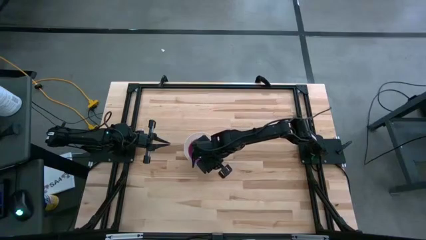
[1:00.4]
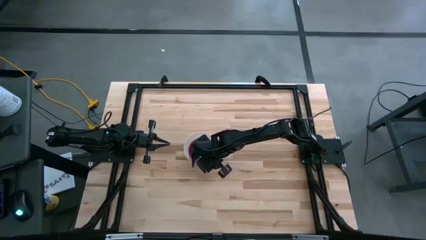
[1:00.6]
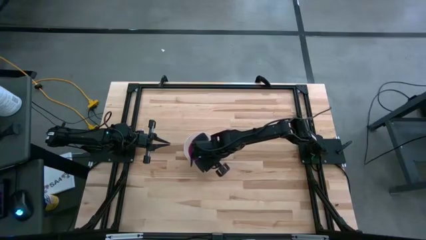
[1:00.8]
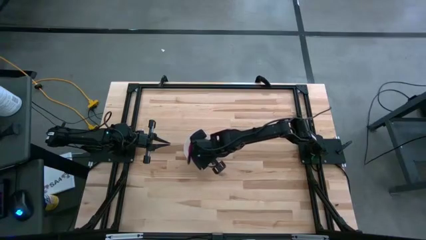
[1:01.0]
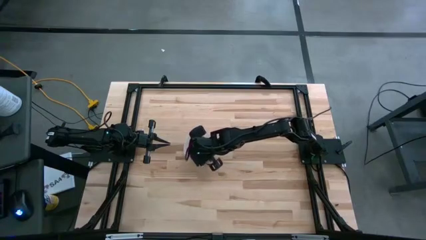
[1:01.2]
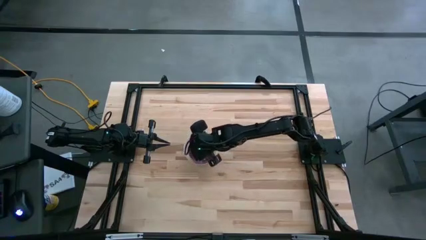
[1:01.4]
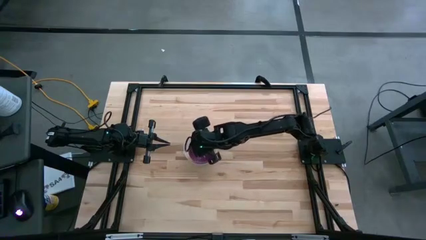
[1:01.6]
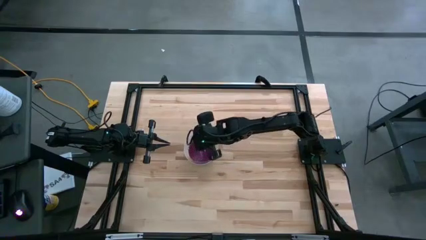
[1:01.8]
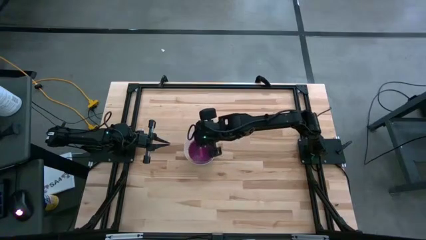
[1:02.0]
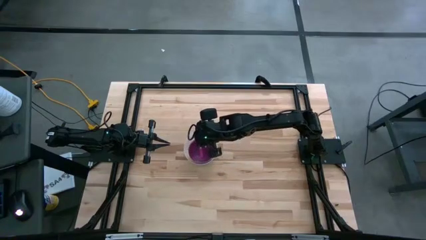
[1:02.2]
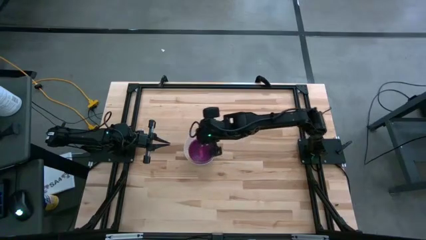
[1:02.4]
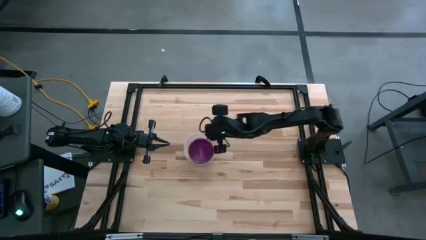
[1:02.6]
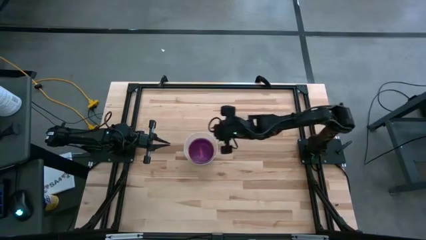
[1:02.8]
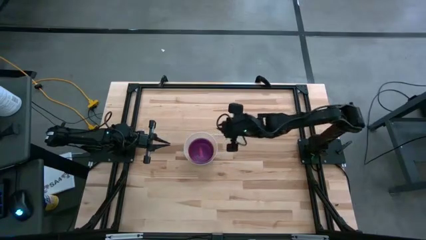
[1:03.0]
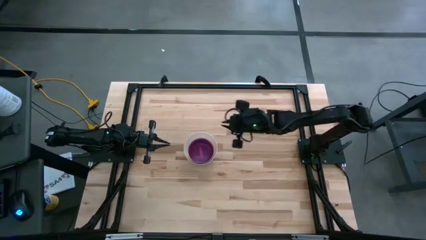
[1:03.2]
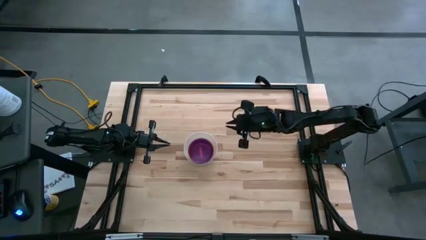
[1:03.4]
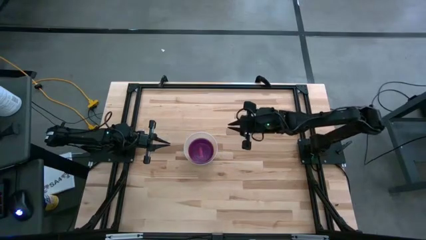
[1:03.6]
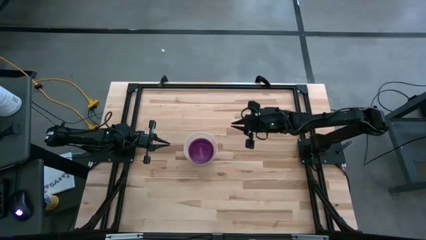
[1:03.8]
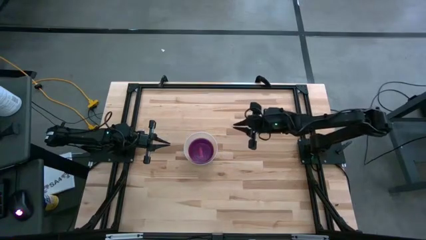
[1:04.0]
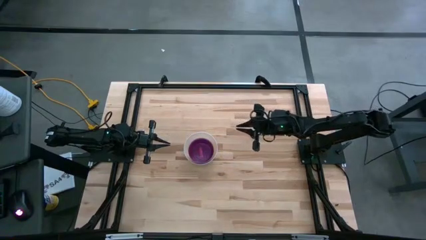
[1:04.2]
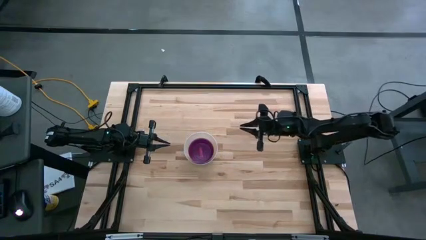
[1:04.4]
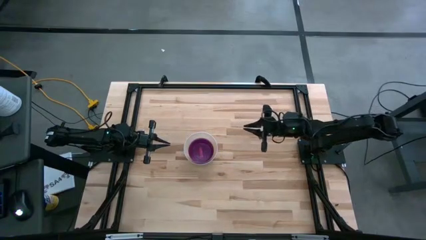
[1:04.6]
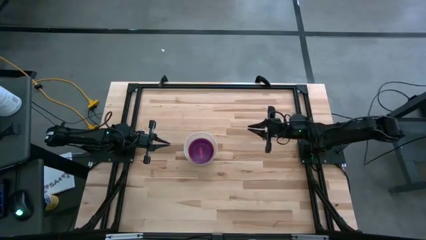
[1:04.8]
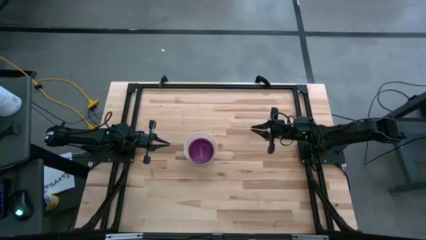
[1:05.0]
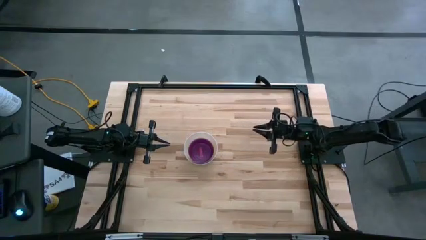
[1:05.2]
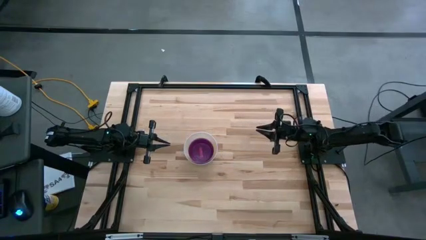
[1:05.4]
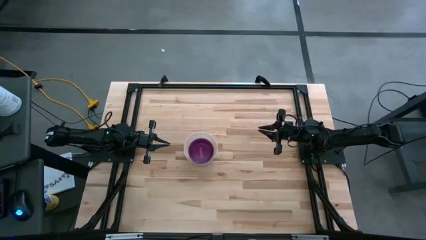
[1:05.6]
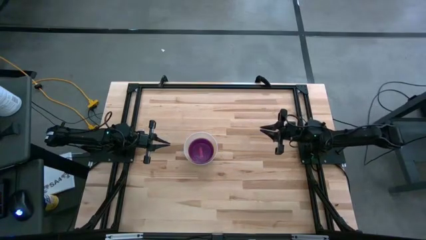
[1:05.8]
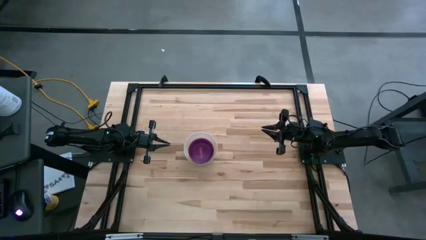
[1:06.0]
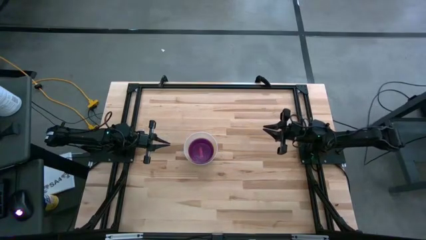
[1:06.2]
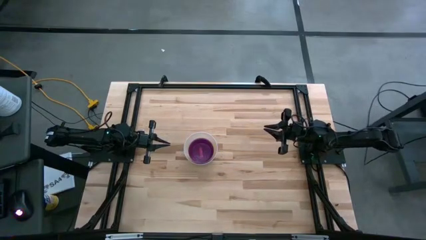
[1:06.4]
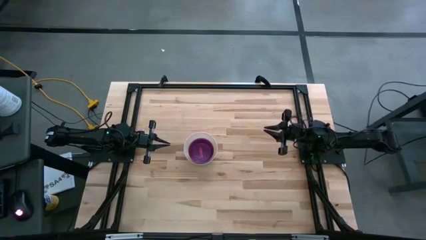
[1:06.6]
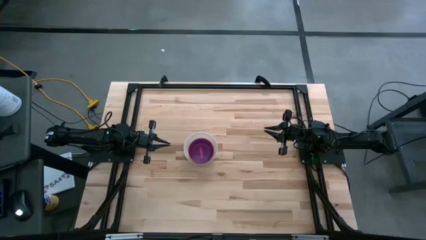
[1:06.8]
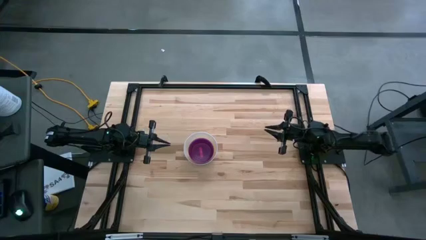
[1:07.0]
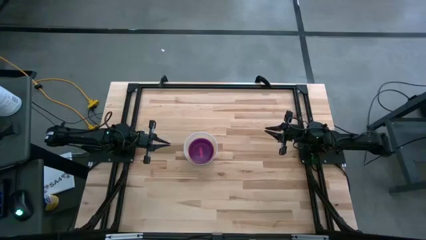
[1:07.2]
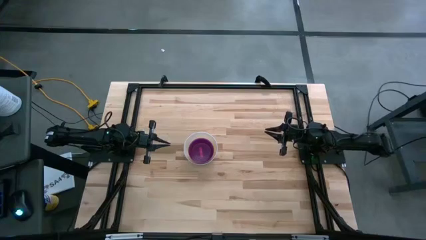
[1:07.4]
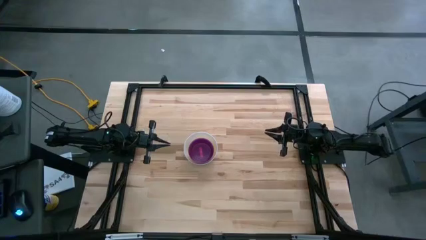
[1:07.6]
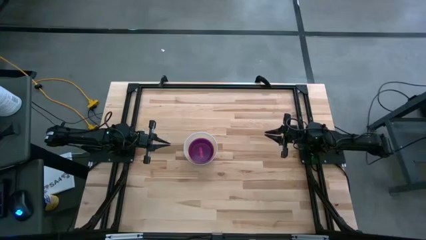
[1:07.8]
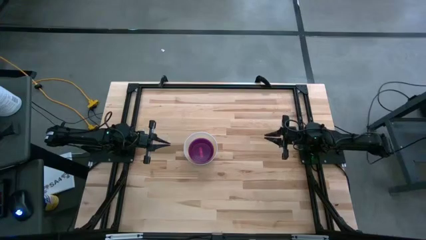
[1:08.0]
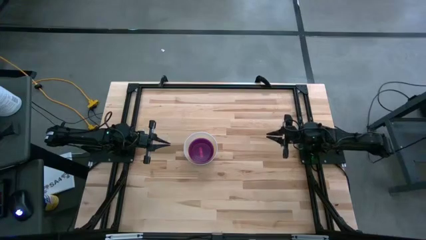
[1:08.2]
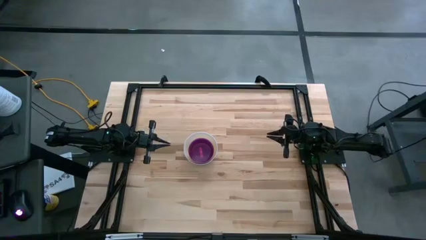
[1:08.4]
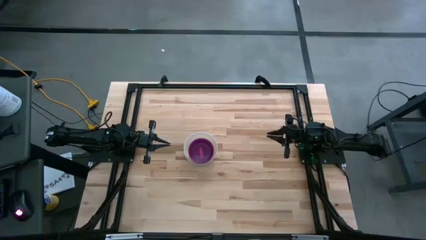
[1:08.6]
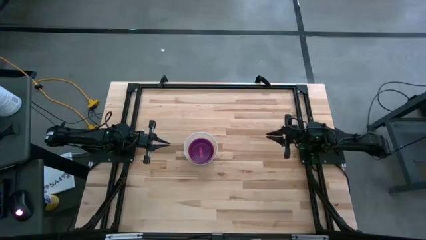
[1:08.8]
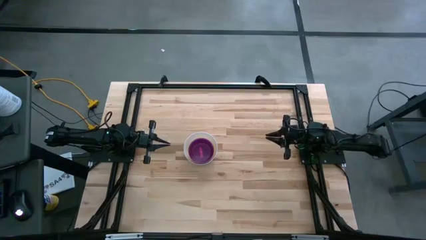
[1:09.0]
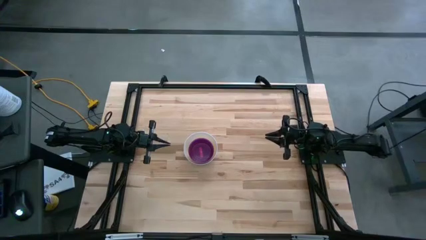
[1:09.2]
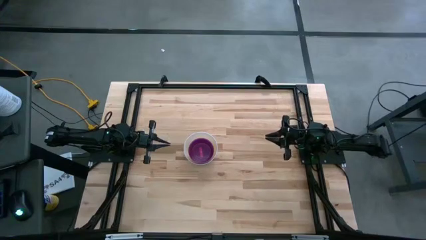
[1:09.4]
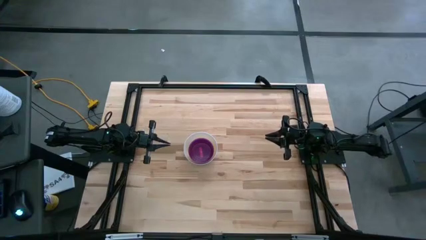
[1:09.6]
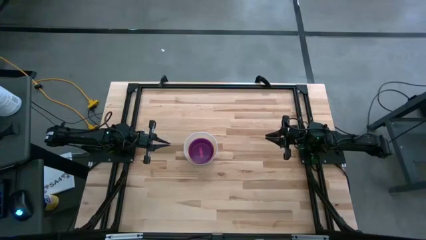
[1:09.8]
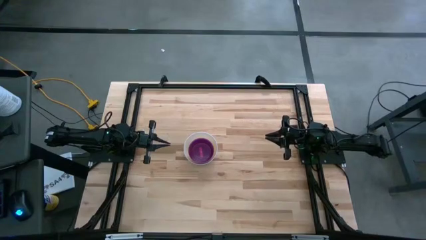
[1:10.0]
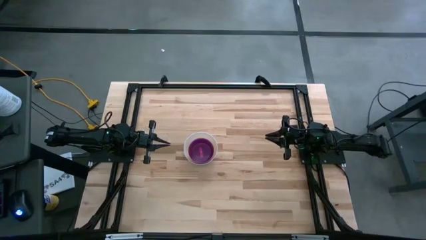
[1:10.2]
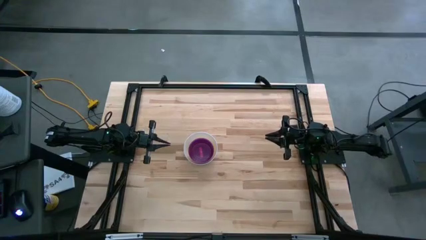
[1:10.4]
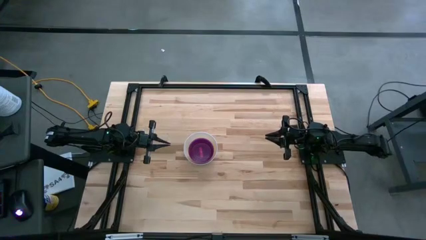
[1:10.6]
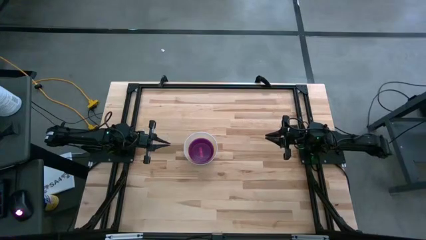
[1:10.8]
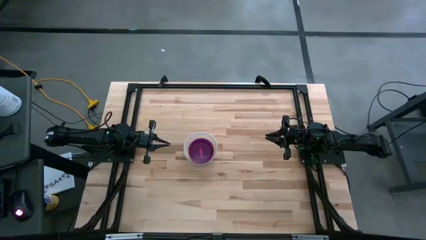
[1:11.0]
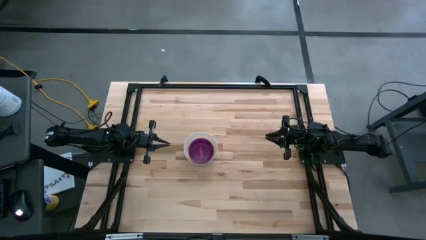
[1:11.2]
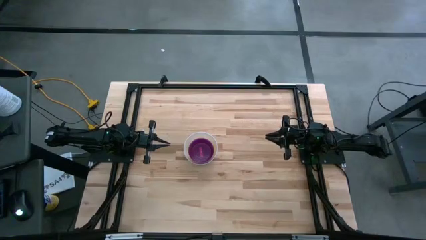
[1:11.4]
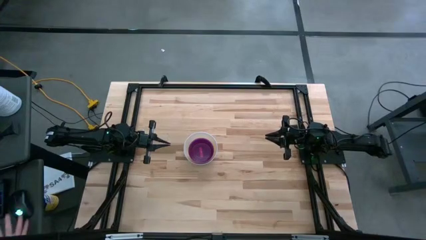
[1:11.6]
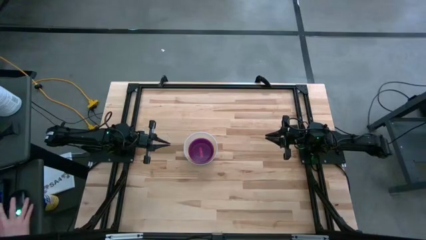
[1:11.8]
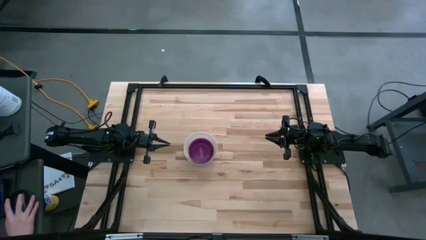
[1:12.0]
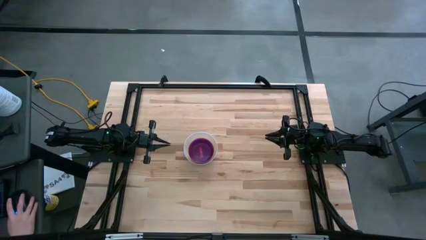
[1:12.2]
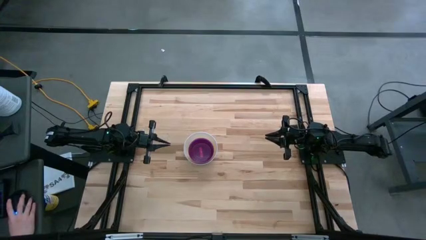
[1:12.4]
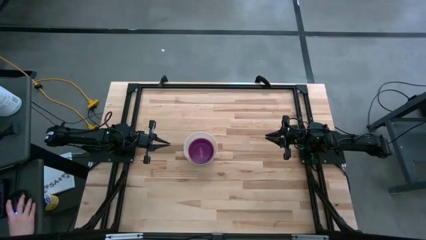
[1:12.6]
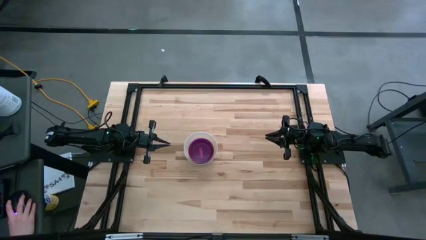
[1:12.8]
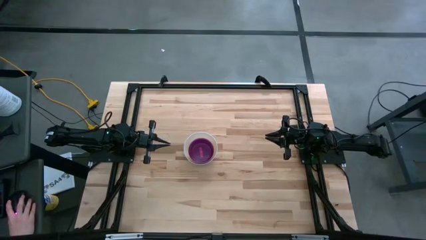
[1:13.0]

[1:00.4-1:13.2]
Return to Home Position
